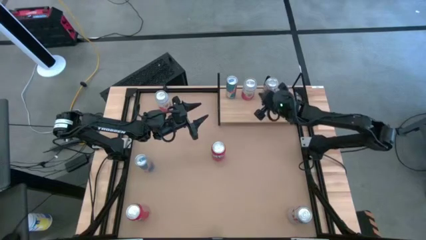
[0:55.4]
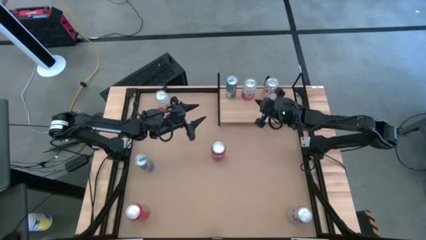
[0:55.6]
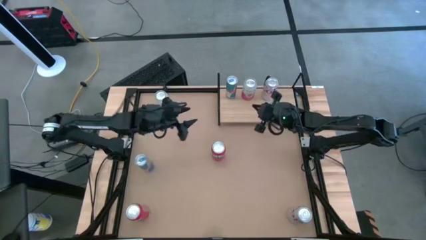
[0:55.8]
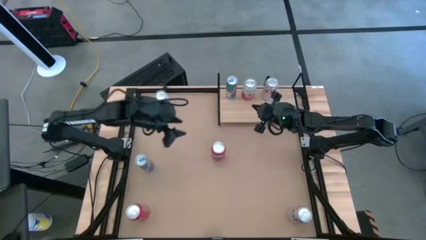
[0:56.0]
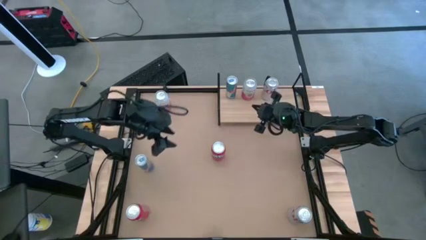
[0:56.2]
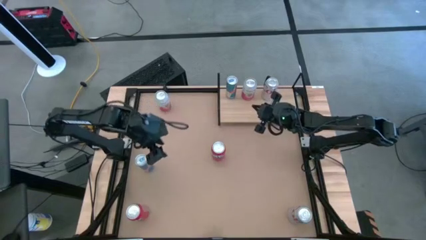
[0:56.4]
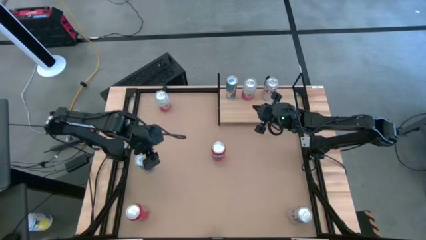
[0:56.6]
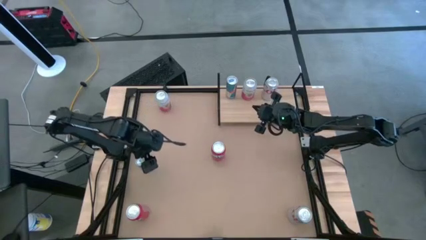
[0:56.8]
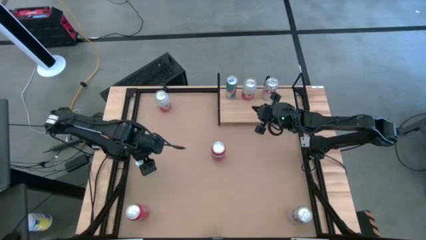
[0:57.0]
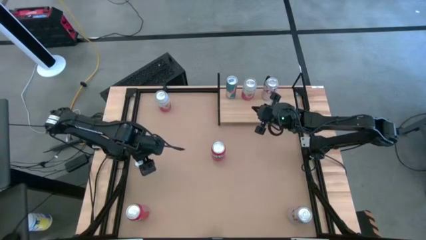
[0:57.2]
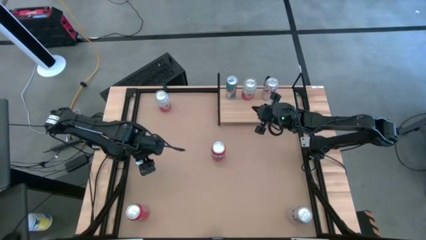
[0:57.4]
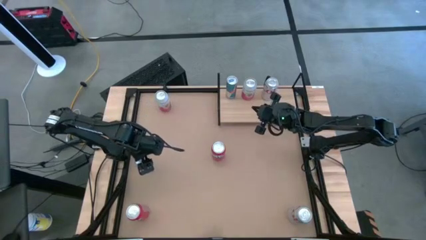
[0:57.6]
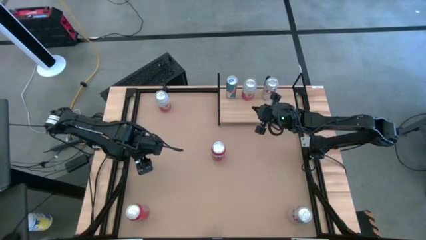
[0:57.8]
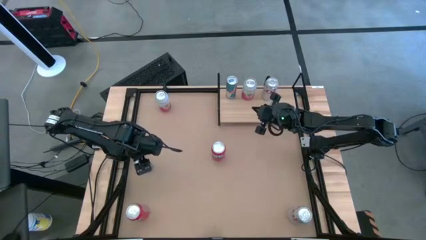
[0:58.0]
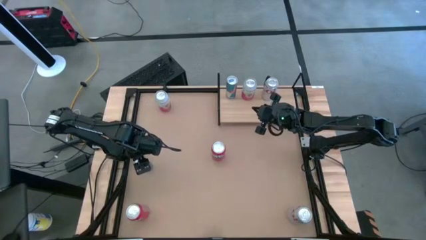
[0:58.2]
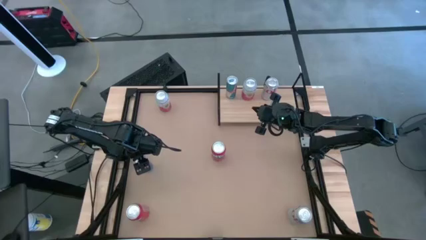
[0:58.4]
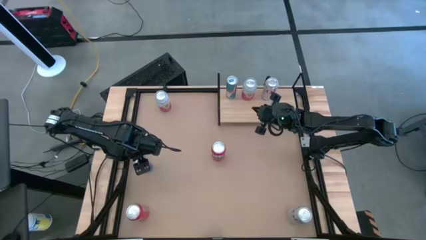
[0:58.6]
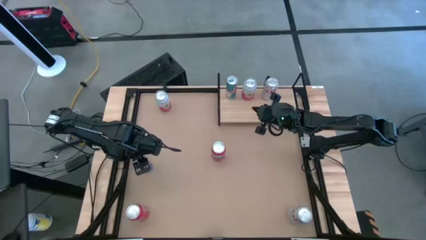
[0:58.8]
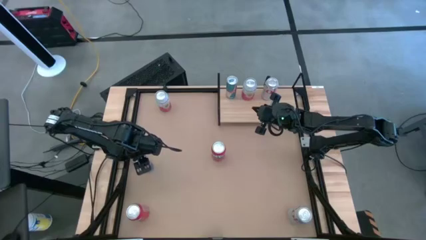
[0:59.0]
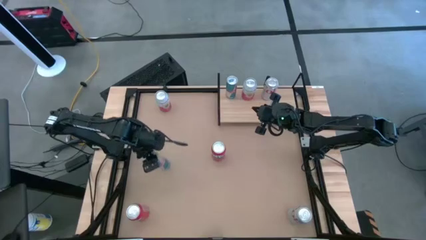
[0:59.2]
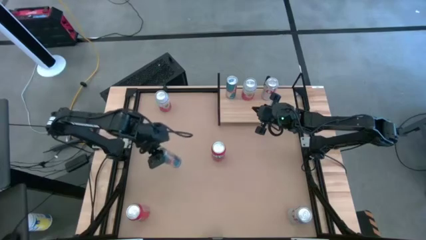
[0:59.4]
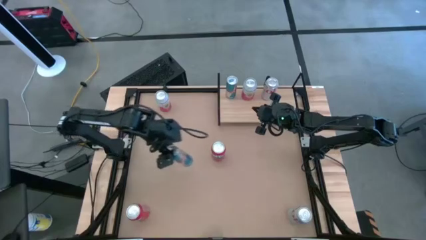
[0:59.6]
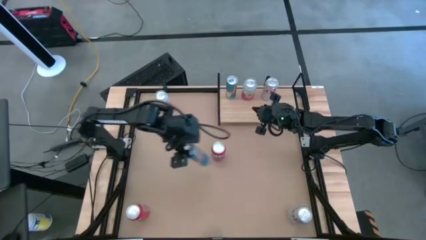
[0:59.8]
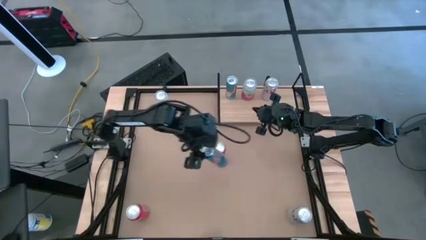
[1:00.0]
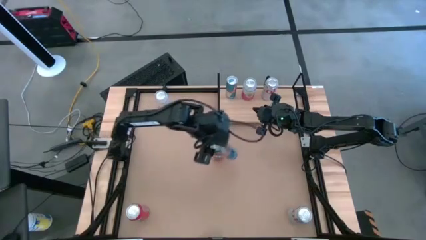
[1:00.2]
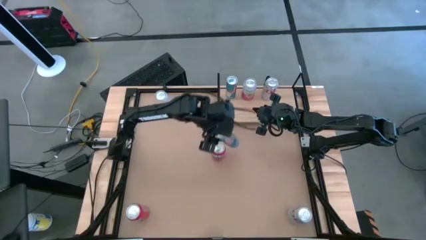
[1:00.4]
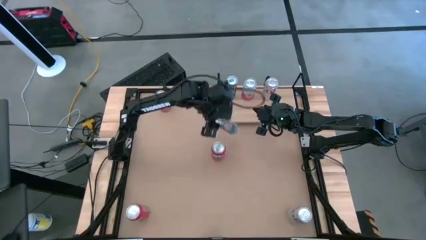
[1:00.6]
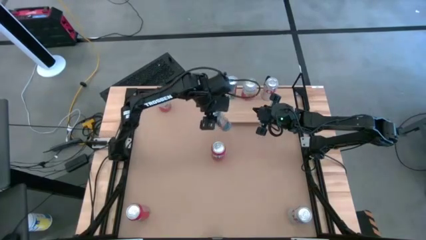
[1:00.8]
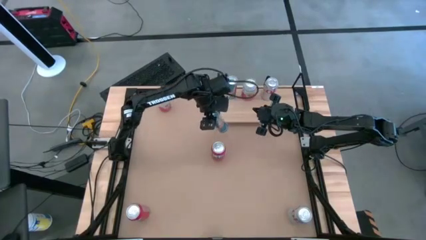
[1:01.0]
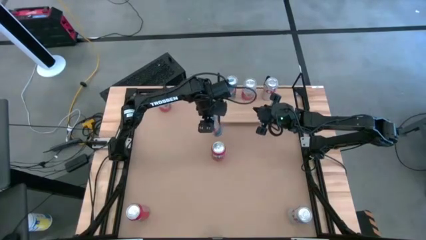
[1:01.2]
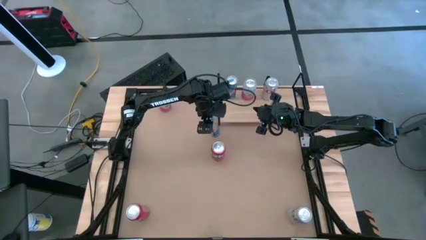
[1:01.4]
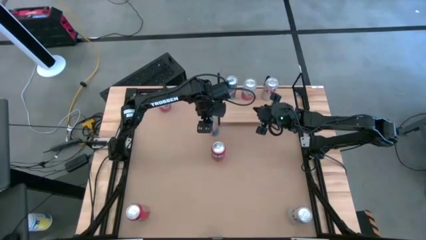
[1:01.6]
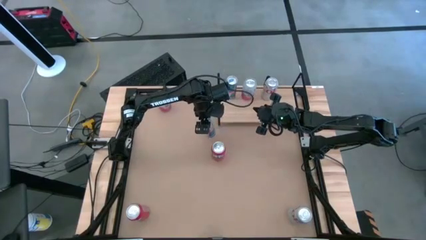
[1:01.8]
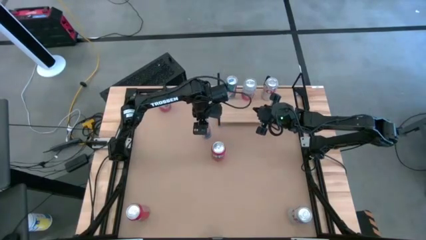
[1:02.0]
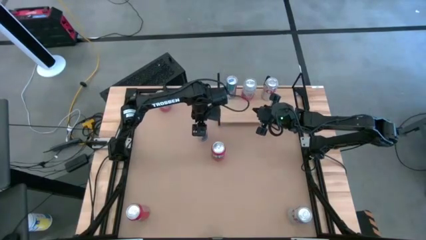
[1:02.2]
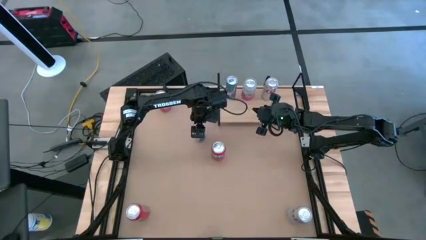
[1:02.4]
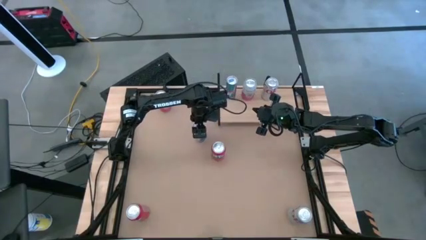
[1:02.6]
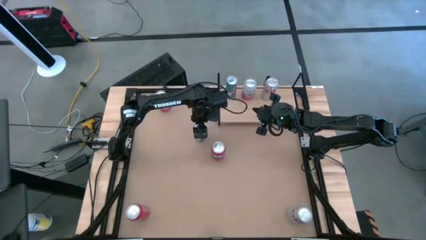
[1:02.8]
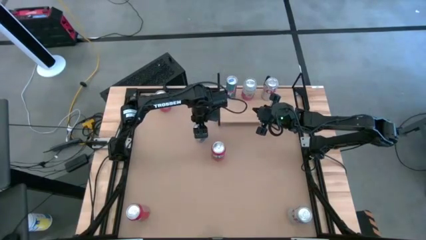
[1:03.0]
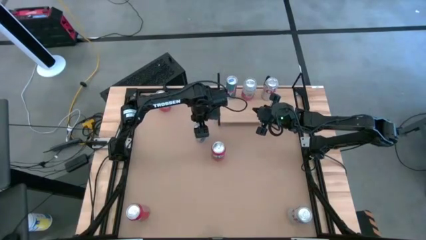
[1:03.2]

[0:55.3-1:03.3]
Task: Place canned beverage on shelf
Move the blue soda can on the top center of the table

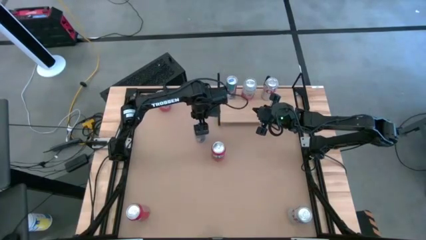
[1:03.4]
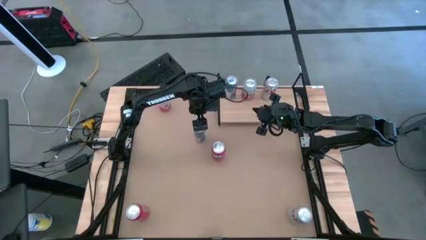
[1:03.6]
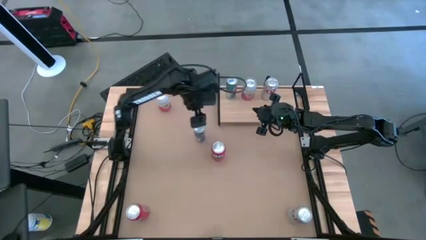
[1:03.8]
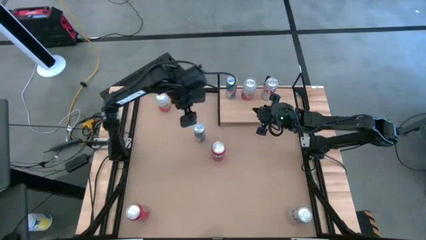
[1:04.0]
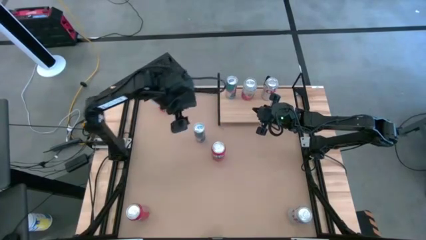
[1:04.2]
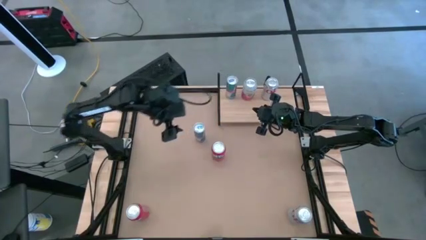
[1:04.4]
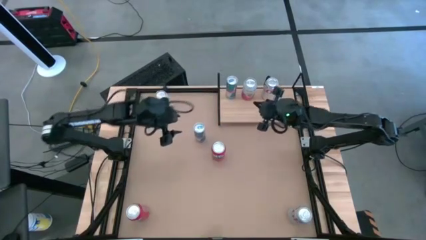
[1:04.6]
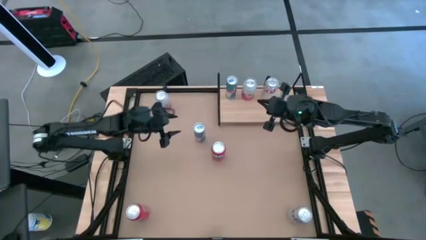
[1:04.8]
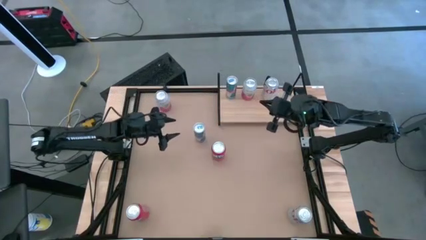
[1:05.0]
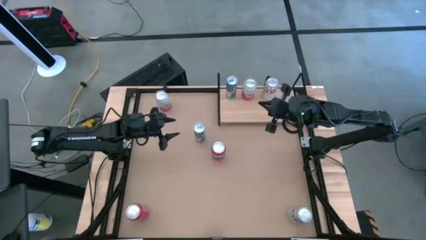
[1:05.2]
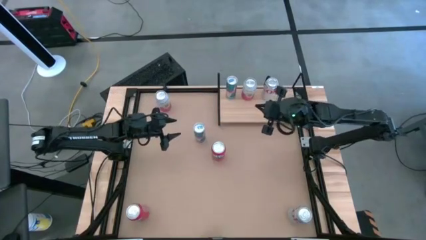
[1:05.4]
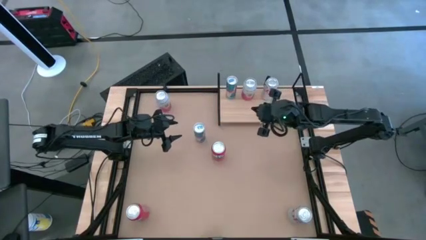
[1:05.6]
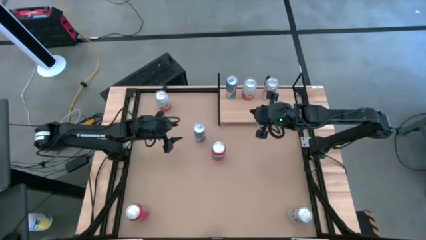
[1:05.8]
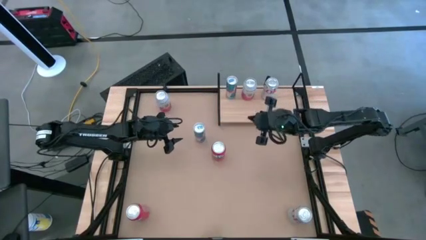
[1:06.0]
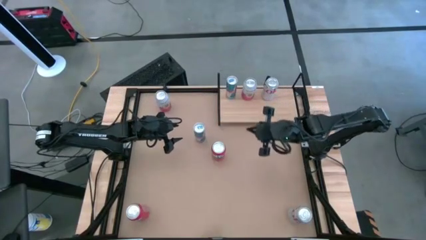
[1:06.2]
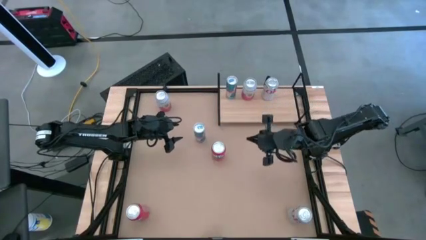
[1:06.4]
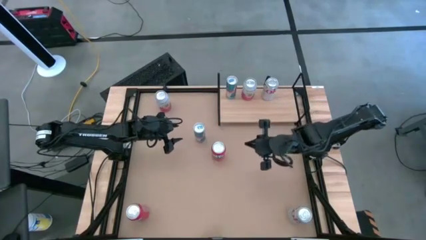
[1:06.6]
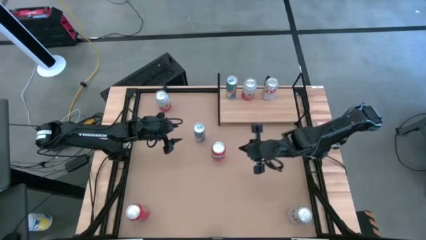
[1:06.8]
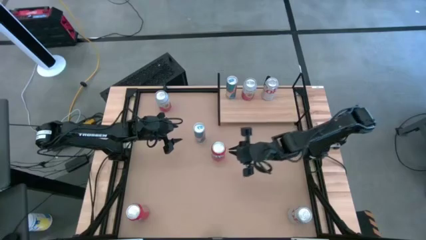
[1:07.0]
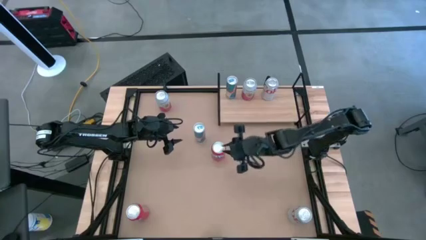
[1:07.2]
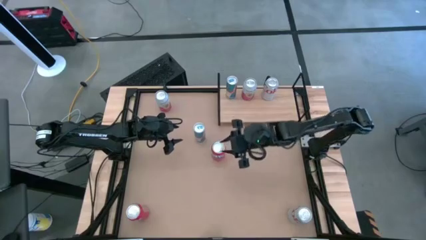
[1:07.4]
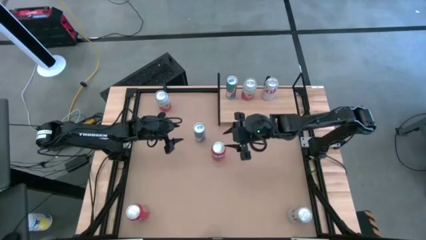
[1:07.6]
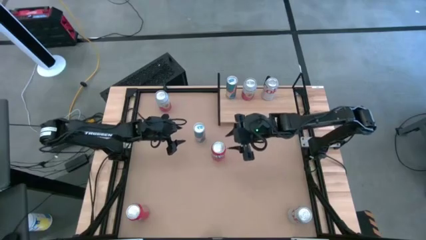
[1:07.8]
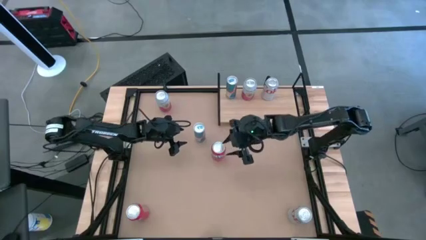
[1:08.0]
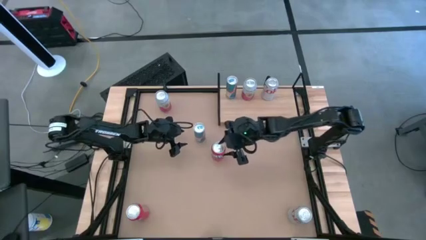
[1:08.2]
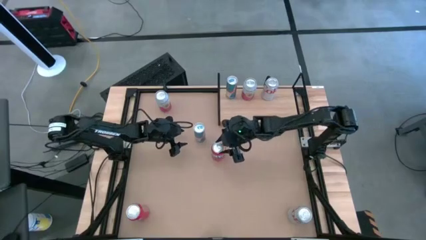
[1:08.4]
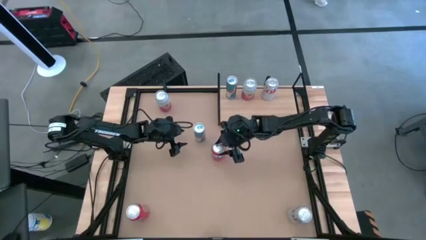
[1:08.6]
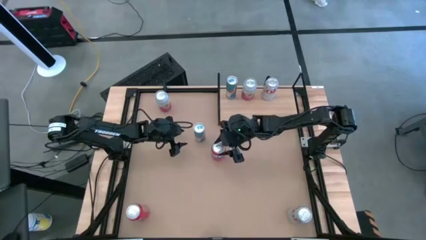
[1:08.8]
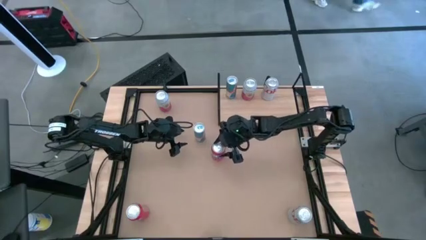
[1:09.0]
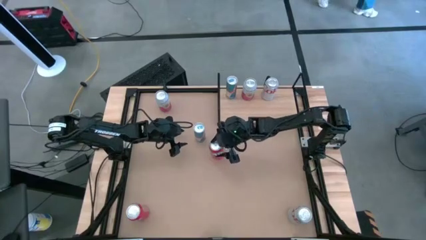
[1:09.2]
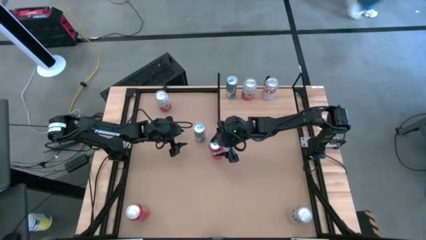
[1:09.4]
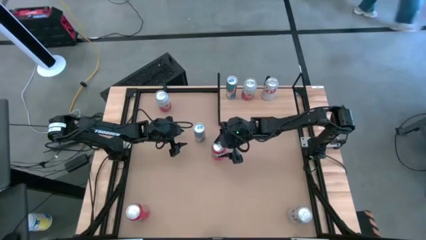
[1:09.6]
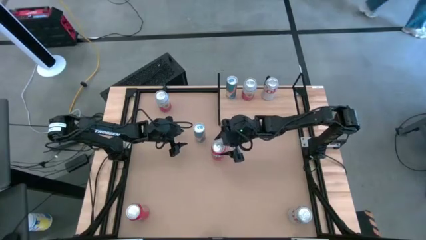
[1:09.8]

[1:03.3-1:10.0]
Put the top orange soda can on the shelf
